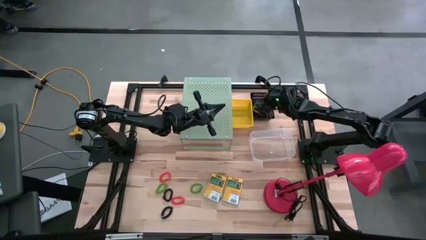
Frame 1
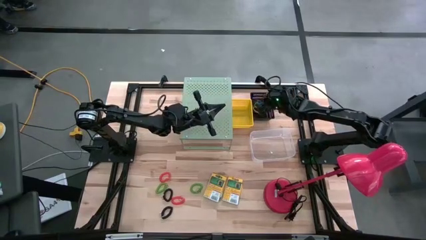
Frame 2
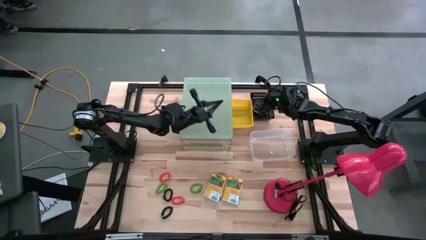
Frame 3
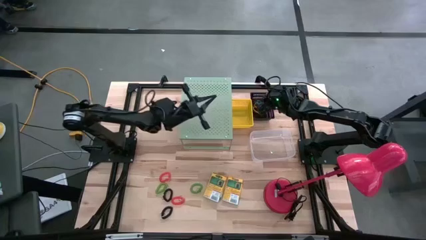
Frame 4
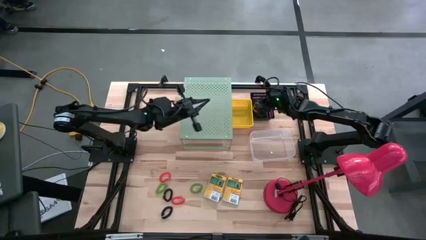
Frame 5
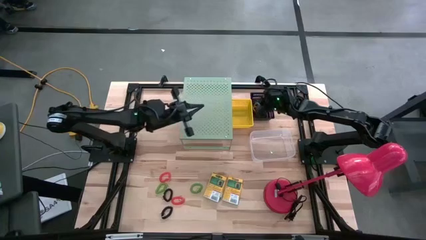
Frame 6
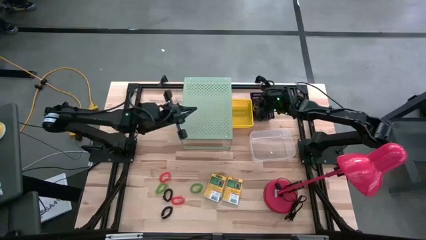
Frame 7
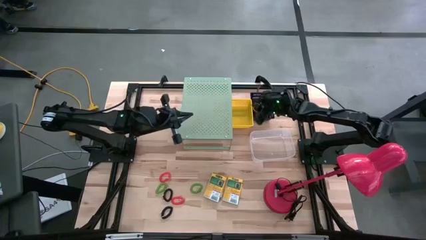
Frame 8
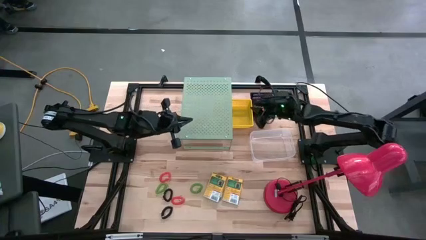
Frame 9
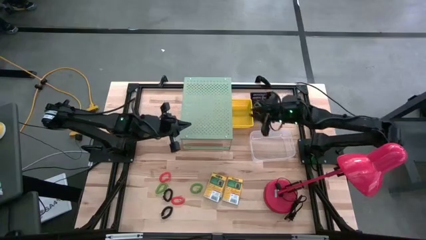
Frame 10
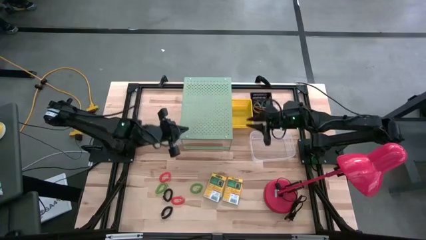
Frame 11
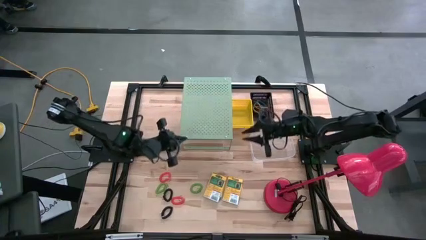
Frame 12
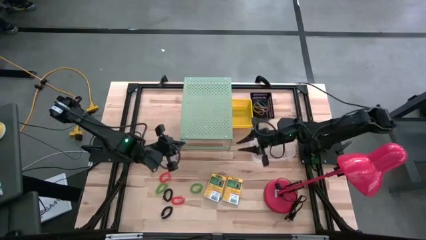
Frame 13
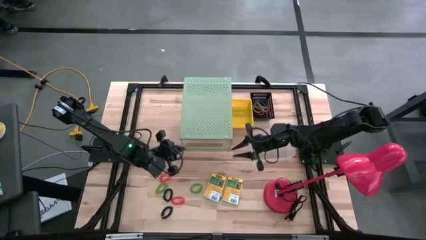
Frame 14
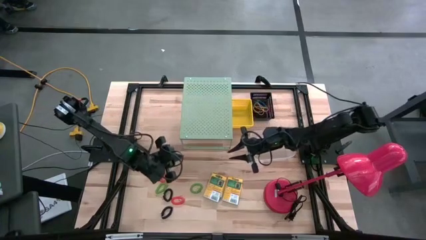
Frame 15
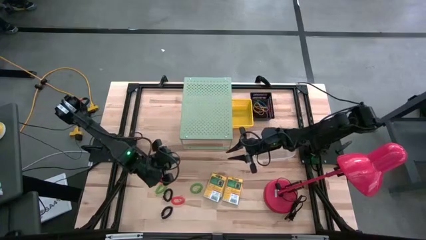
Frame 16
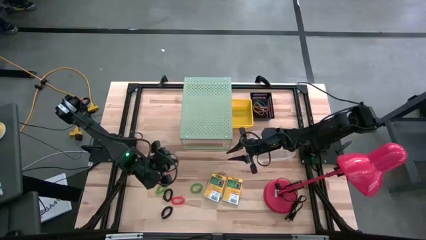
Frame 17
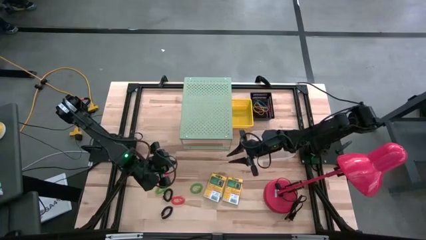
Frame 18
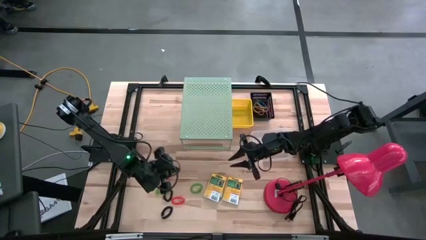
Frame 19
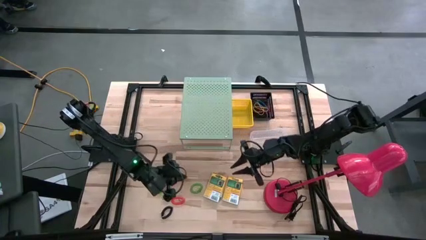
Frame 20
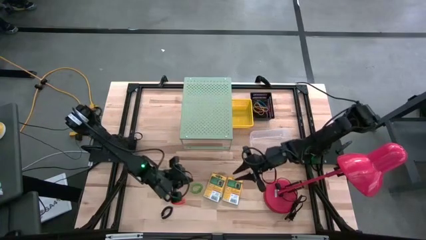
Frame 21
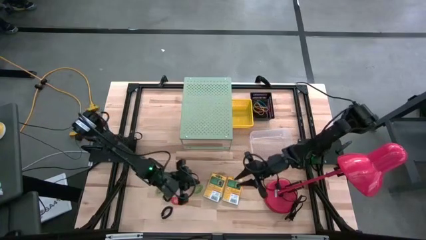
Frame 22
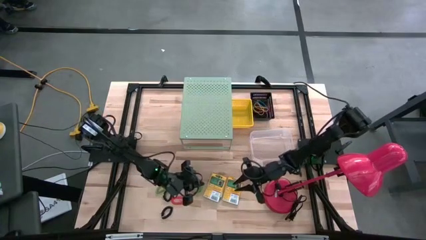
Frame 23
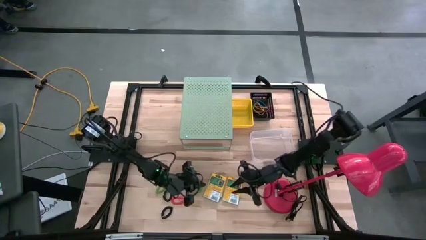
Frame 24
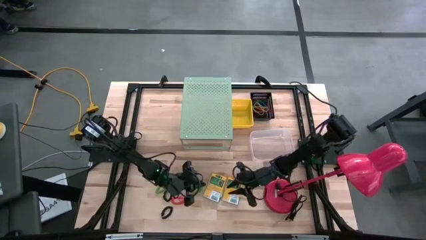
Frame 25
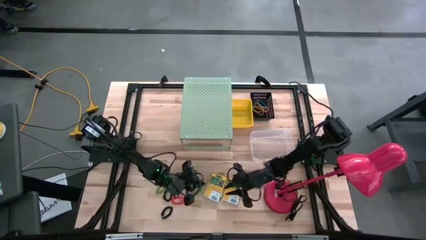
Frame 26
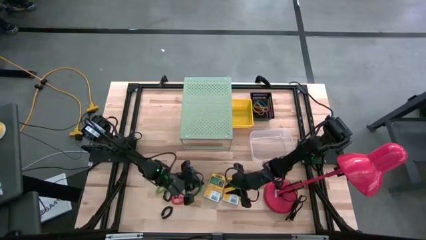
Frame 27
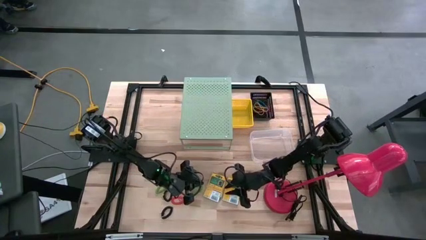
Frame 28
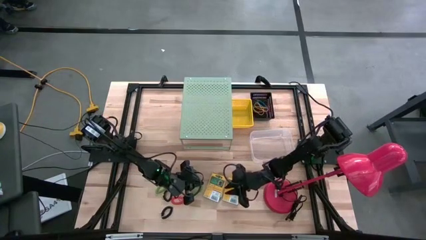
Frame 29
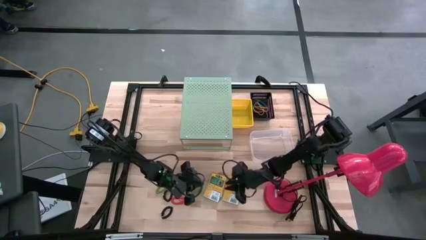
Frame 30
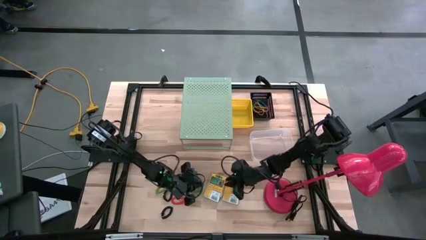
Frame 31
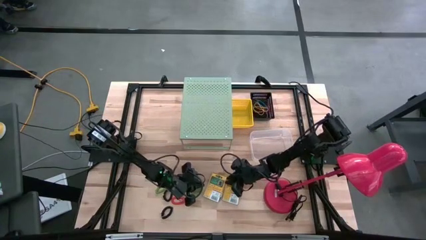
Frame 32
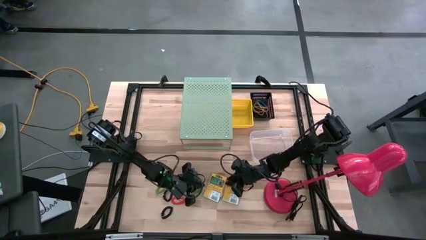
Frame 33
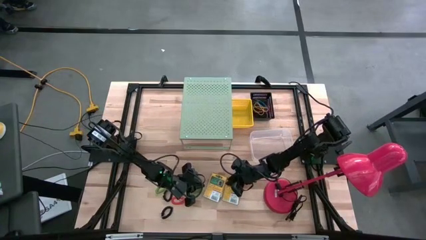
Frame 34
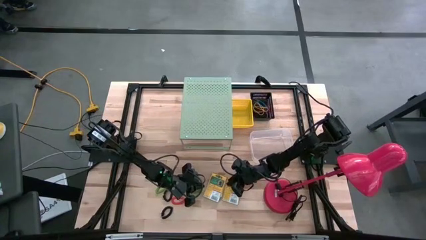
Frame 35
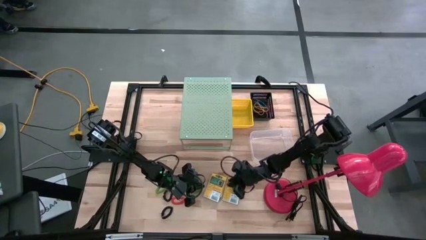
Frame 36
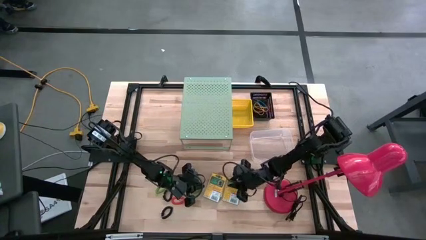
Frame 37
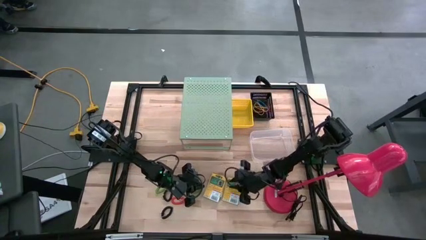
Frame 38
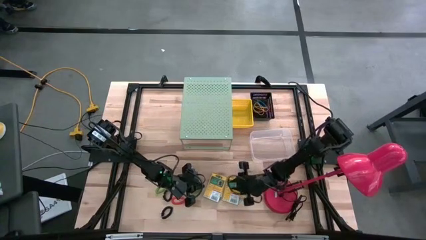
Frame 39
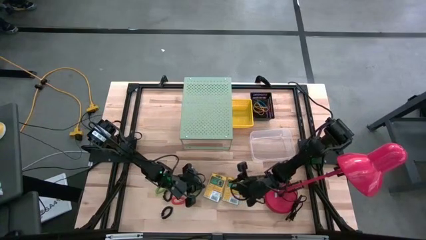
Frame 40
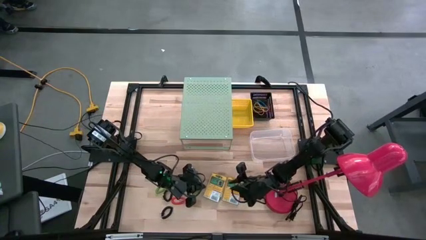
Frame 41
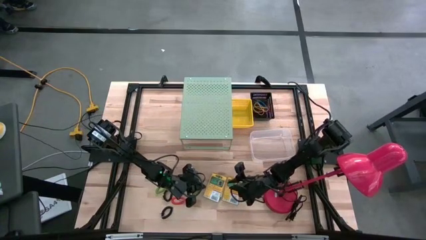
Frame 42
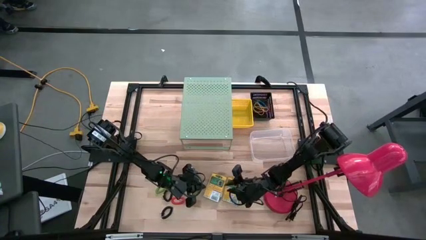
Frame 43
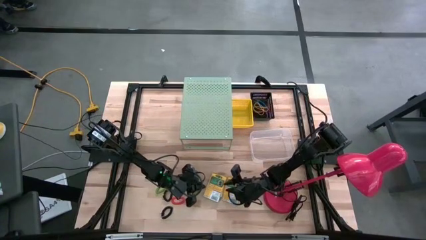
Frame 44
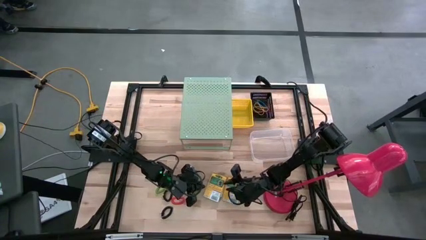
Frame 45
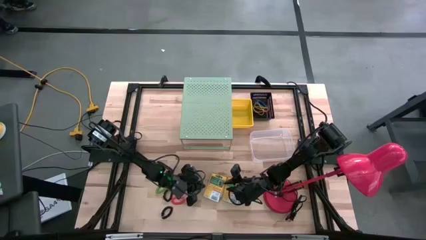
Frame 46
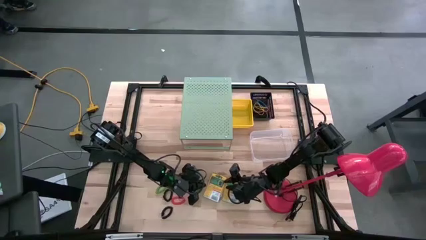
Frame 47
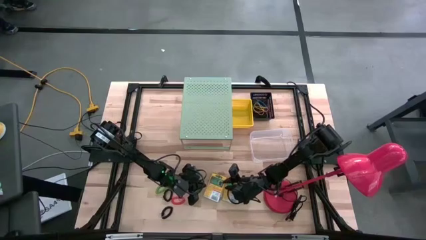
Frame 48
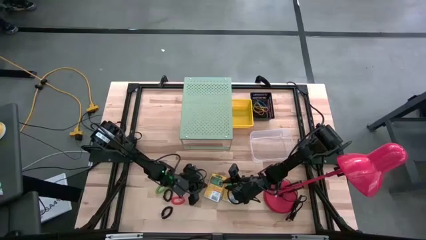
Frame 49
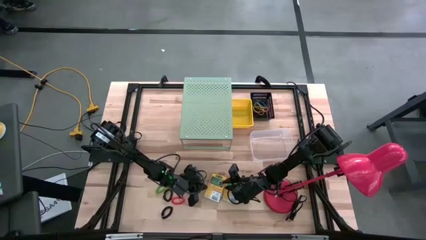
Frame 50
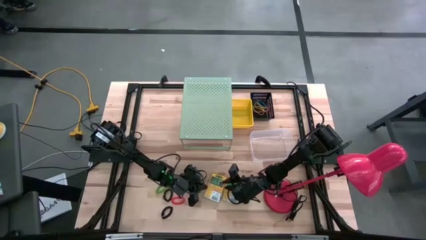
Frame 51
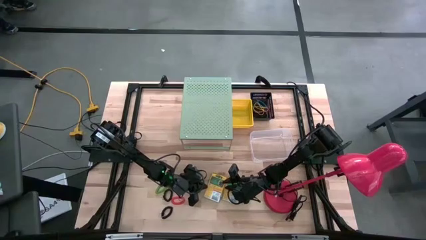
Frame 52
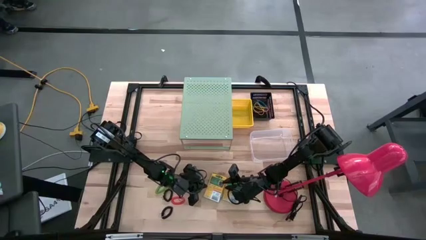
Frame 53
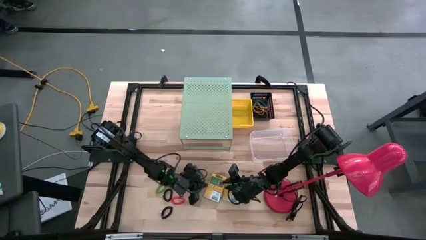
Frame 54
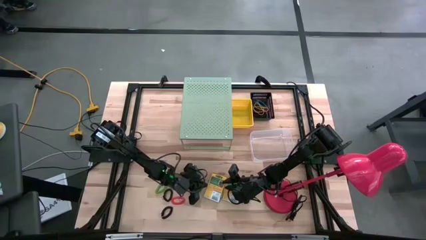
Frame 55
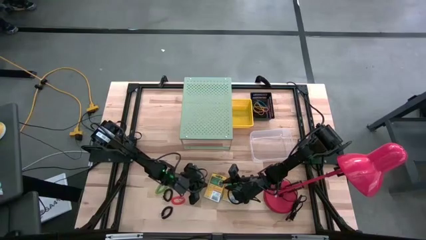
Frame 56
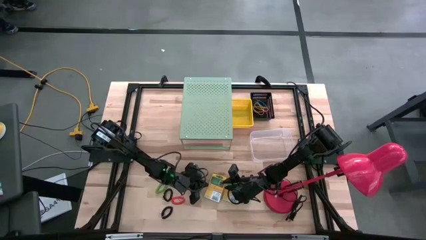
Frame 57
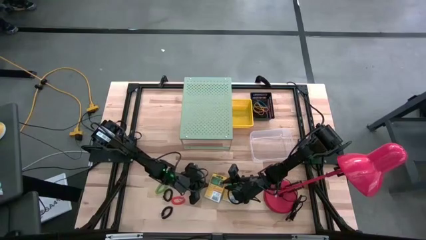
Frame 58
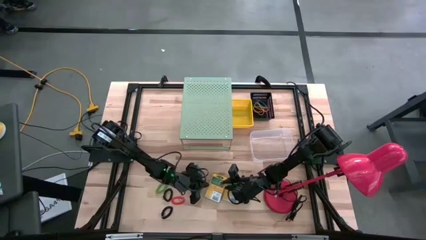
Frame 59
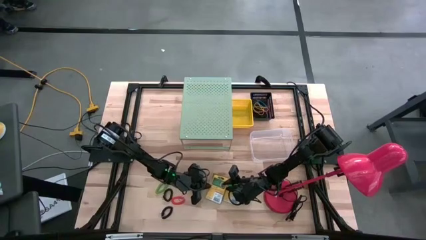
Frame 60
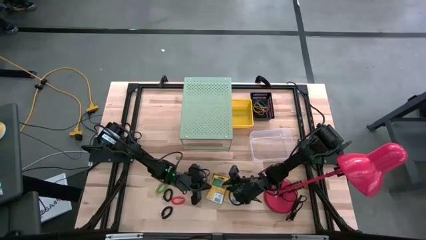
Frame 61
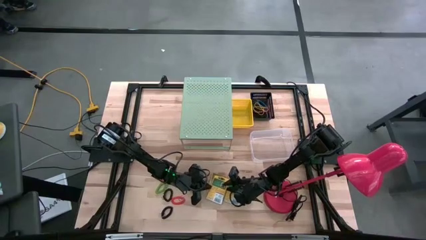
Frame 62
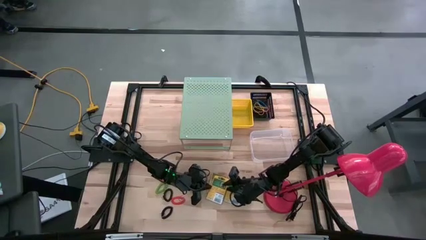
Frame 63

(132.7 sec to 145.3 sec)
Task: Pick & Place Office Desk Supplies
Put the crayon box into the transparent bin
